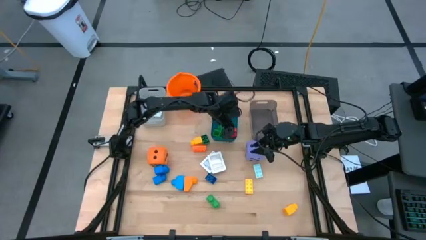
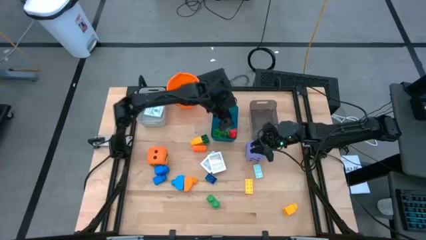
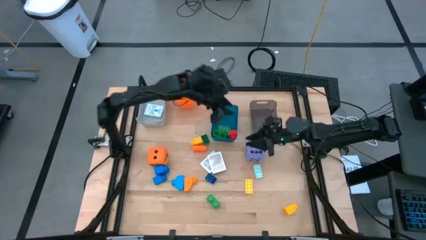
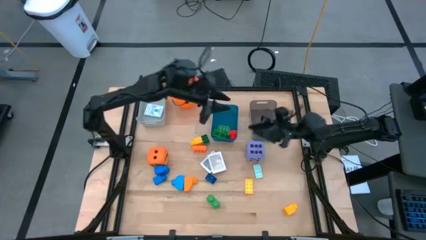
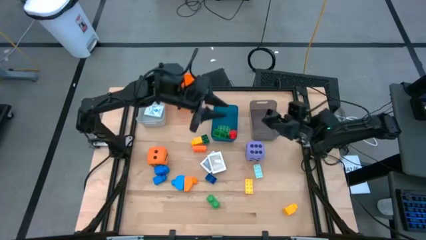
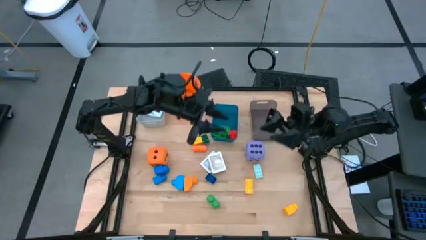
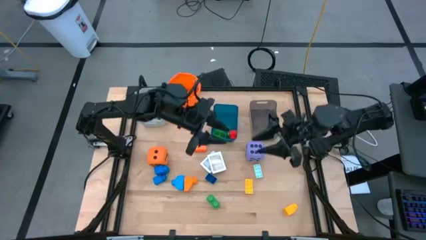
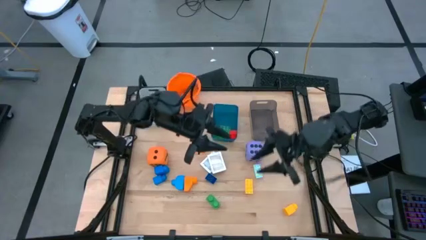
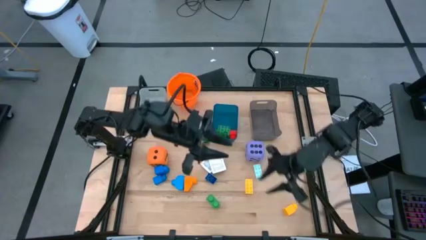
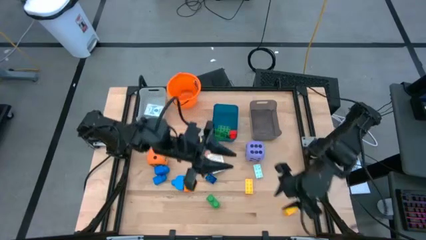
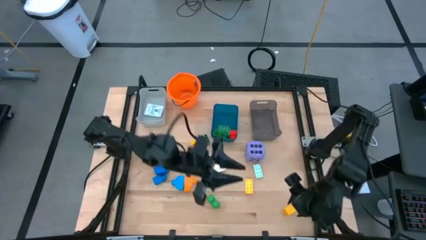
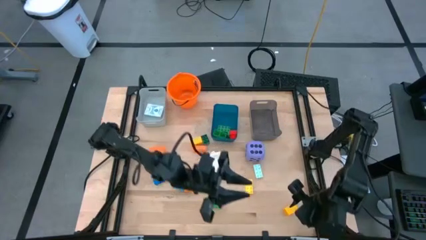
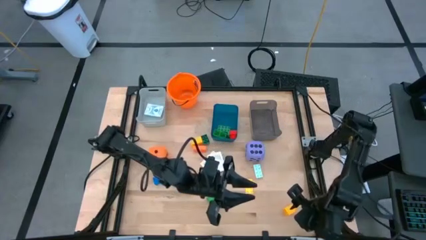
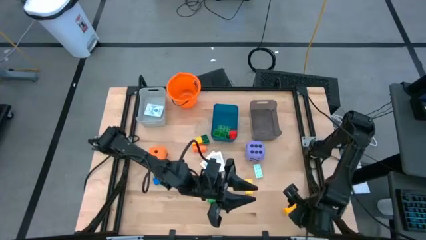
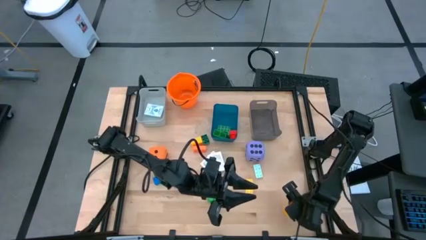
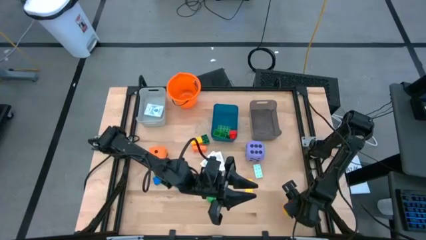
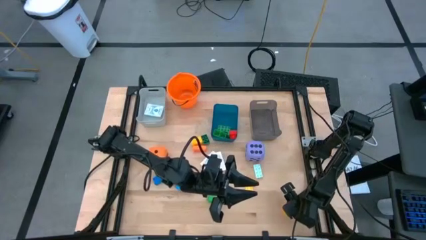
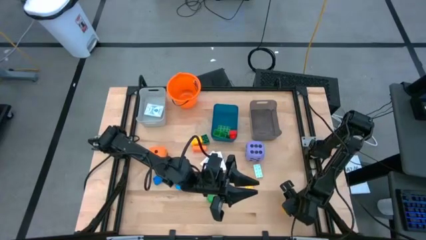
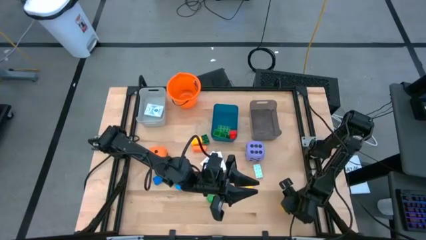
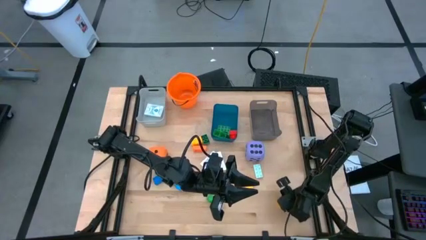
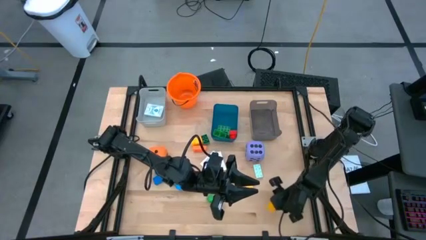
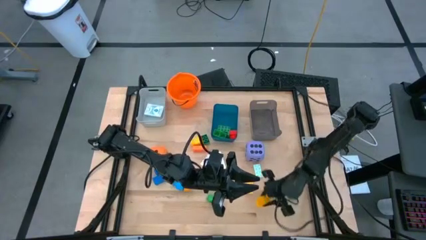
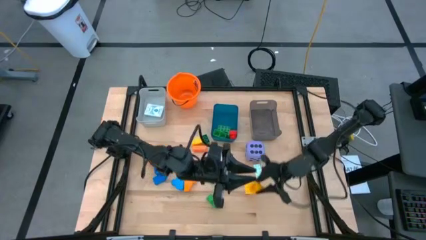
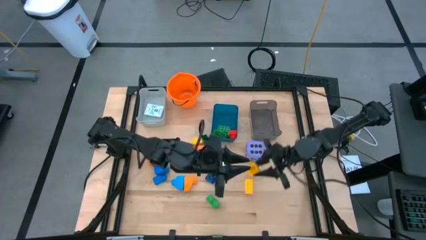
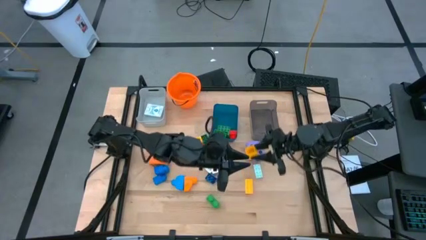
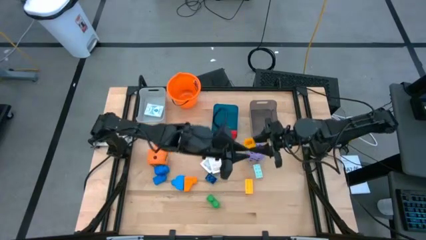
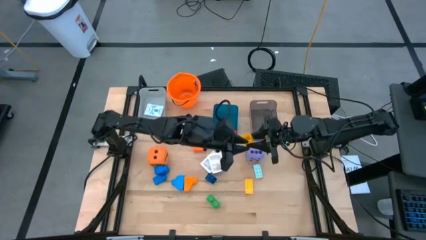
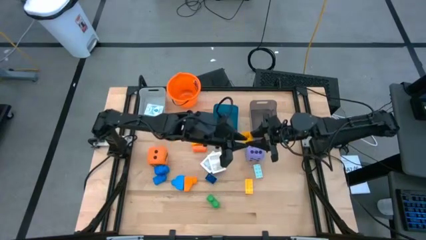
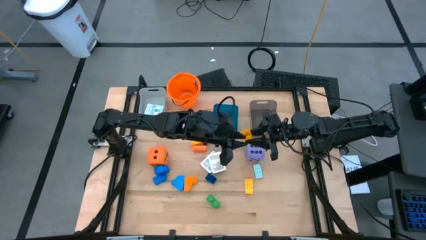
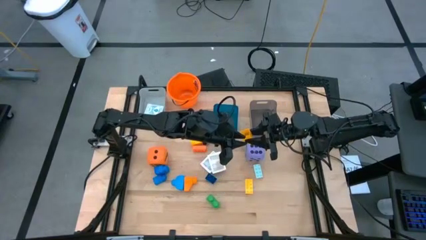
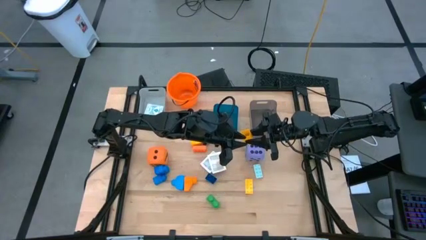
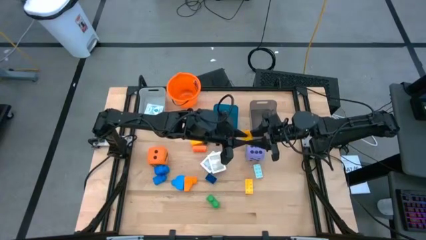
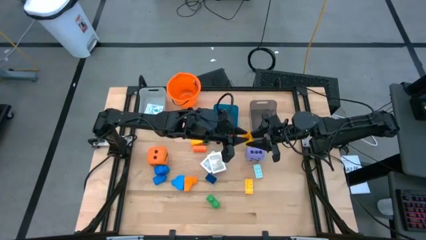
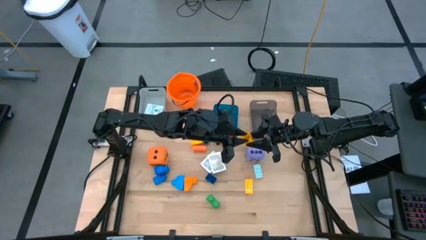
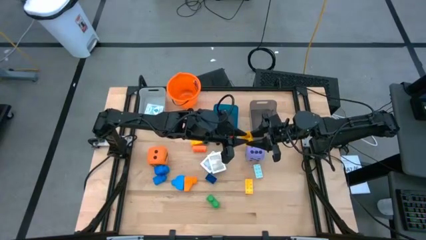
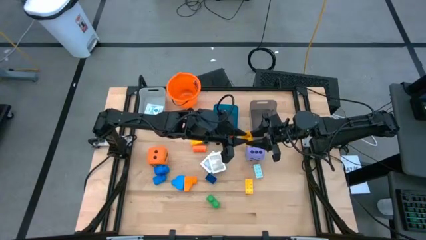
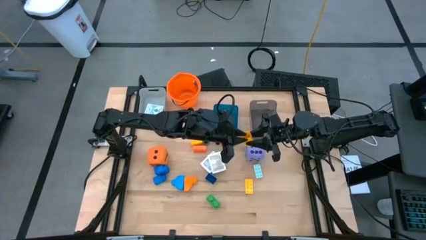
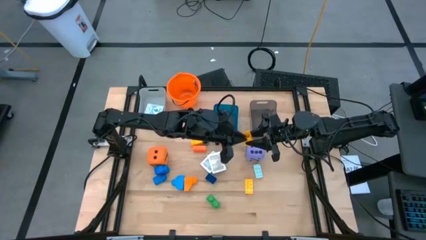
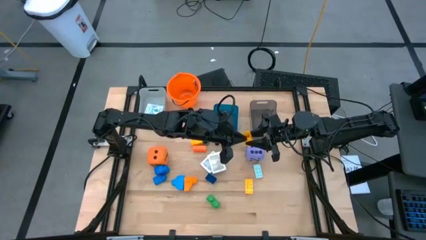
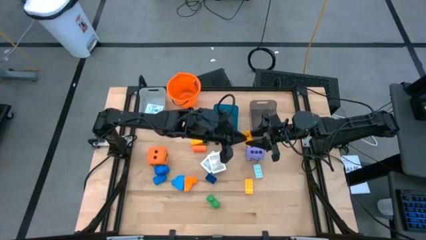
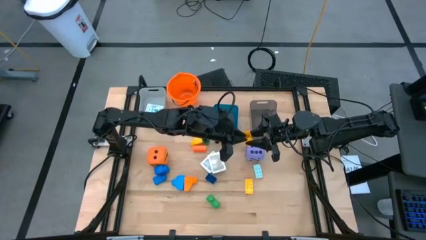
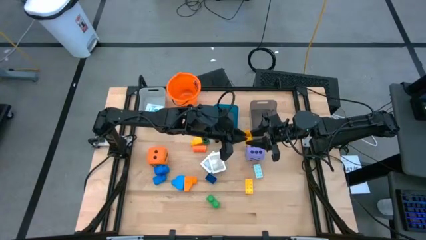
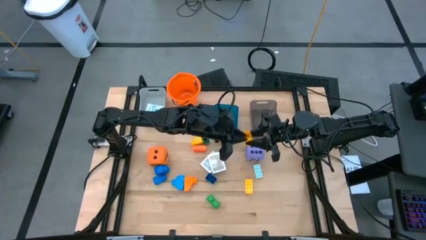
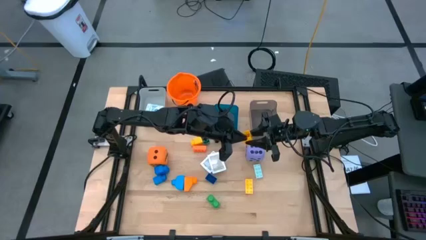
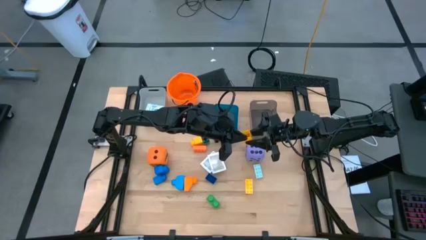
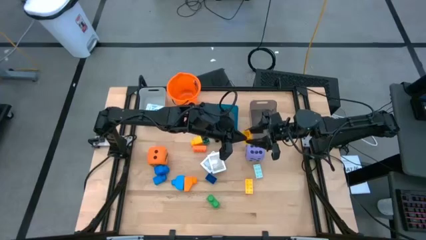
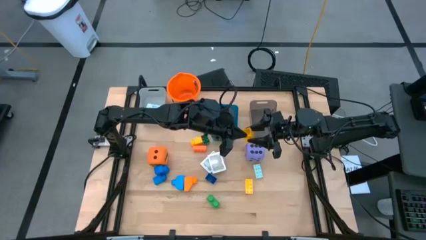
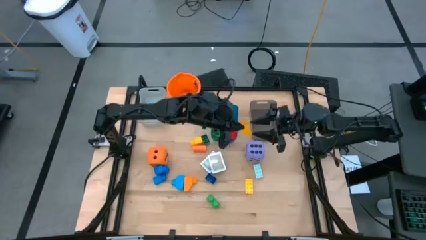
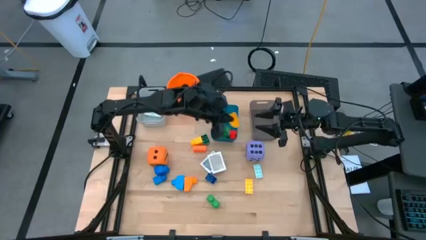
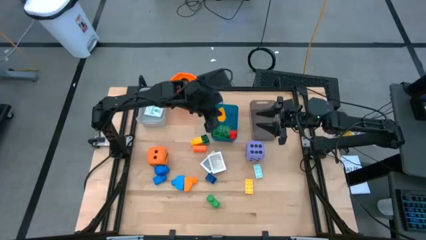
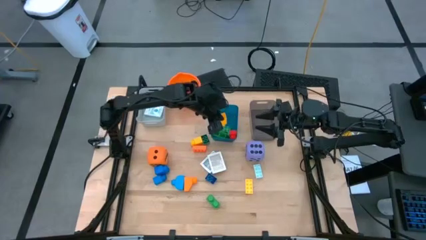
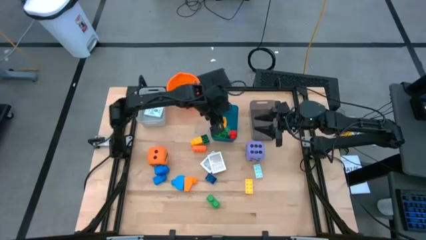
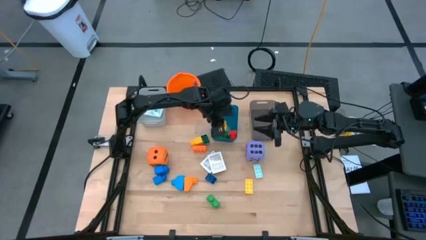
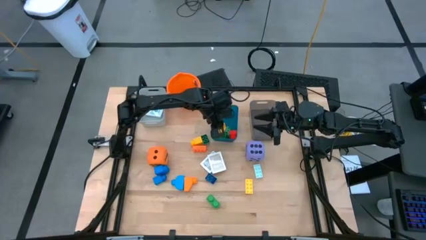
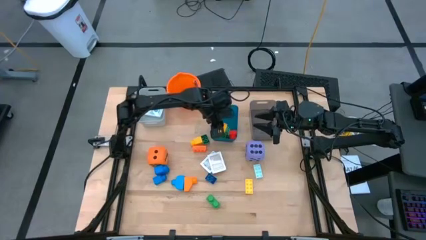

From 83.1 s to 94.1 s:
Task: Pick & Place Toys
Put the yellow game piece into the blue bin
